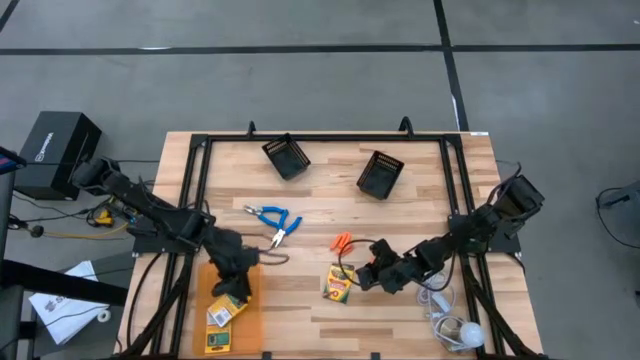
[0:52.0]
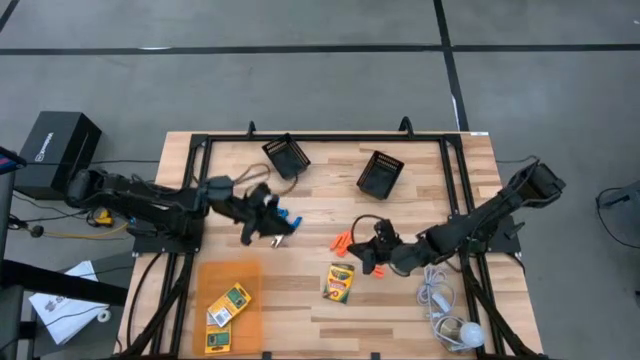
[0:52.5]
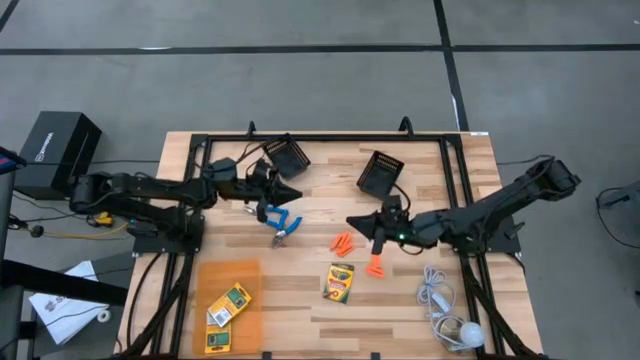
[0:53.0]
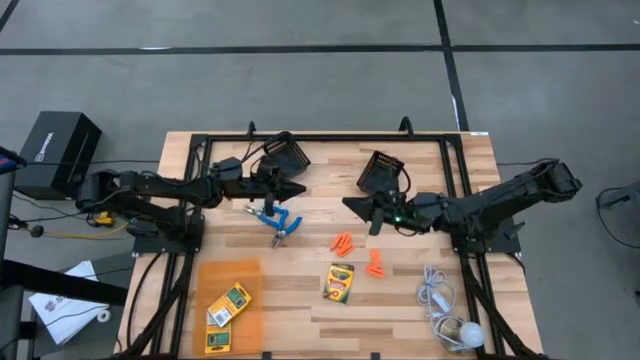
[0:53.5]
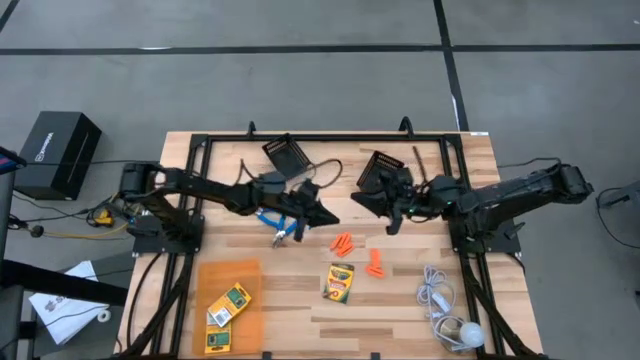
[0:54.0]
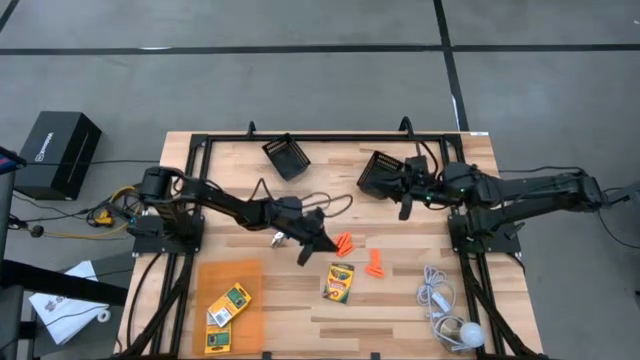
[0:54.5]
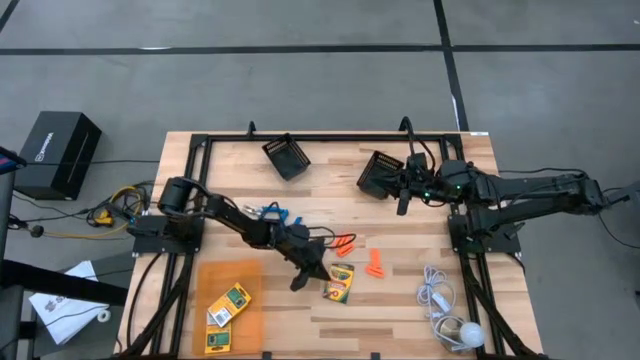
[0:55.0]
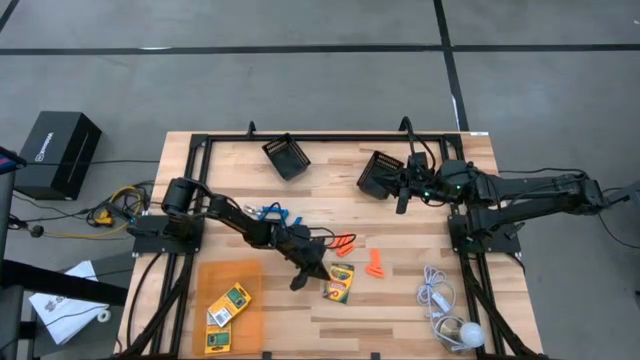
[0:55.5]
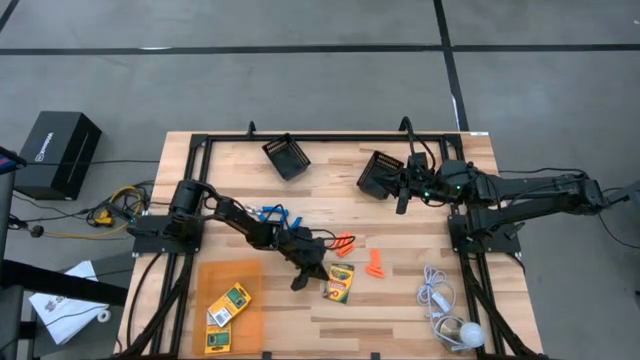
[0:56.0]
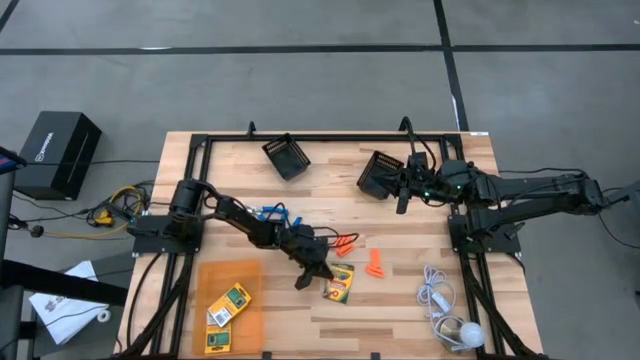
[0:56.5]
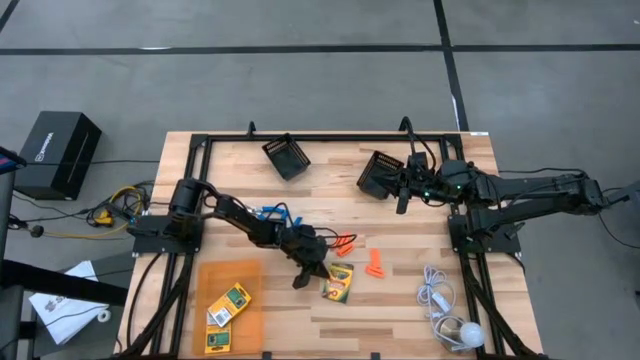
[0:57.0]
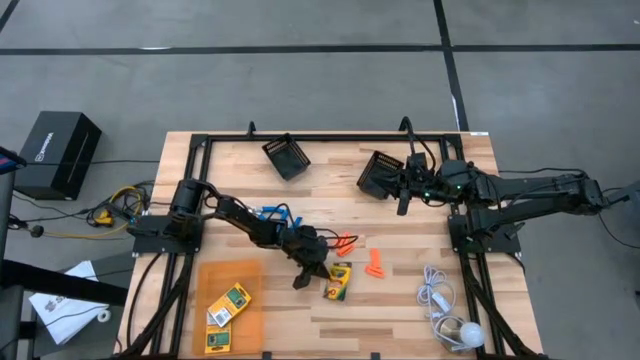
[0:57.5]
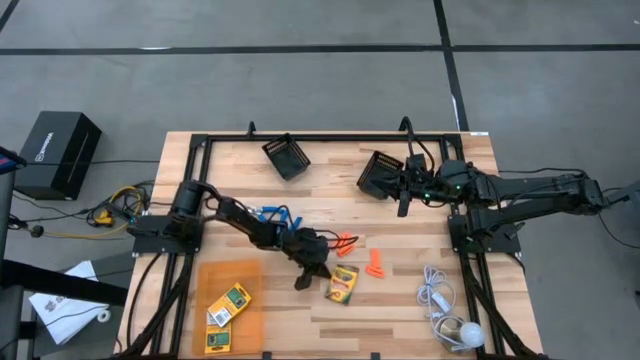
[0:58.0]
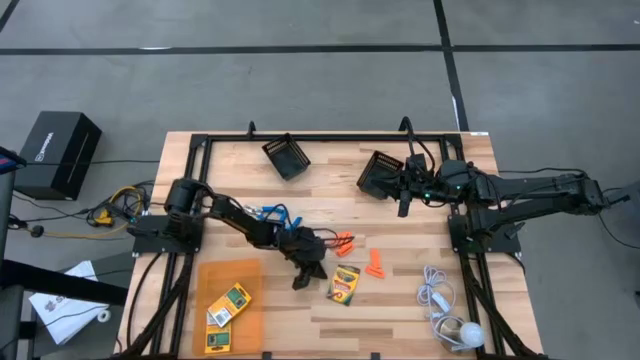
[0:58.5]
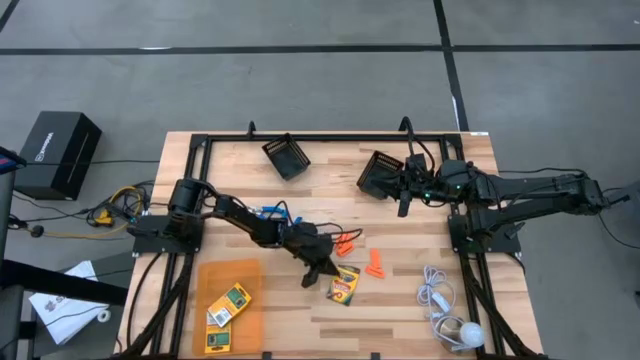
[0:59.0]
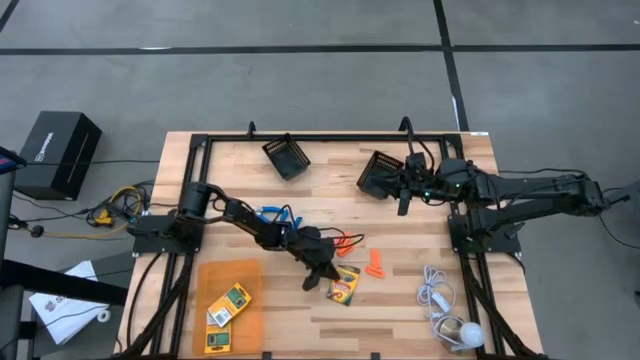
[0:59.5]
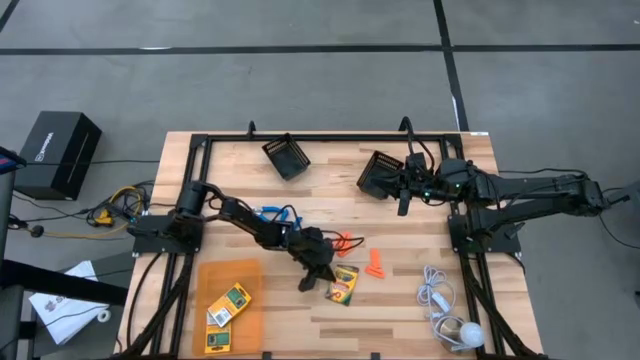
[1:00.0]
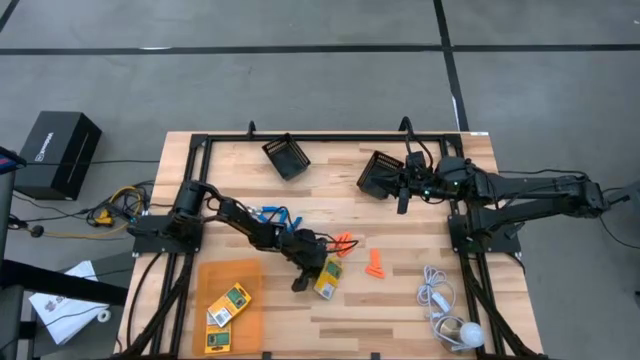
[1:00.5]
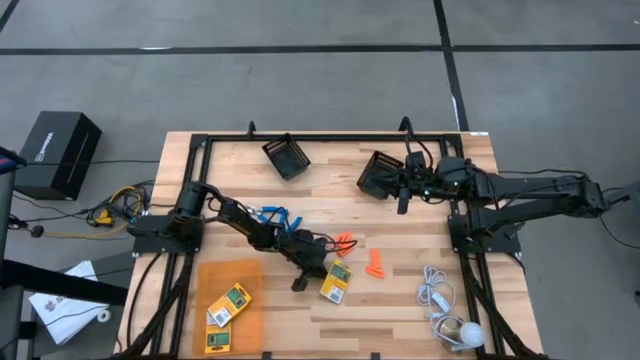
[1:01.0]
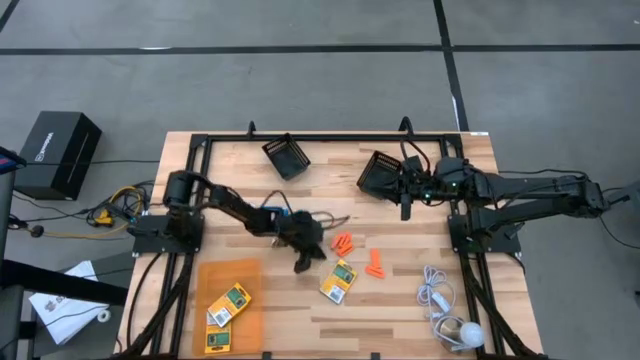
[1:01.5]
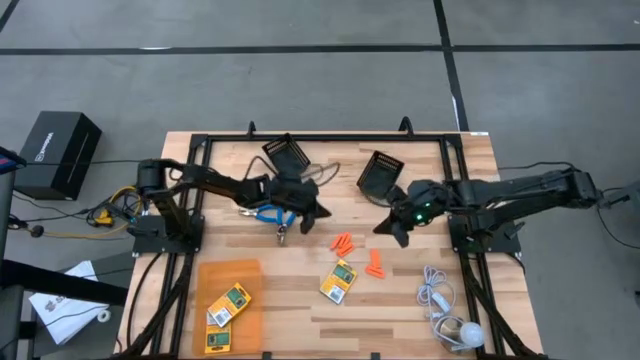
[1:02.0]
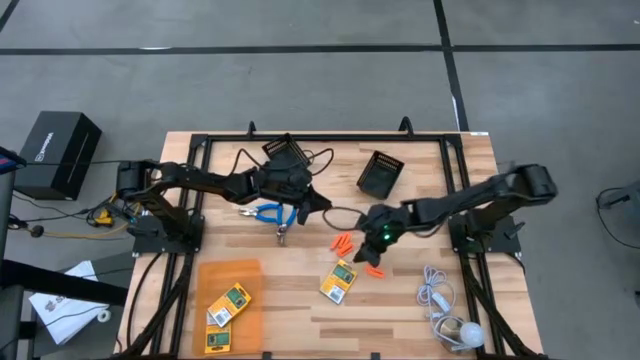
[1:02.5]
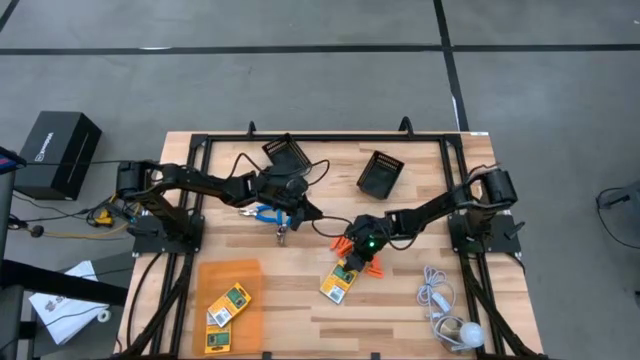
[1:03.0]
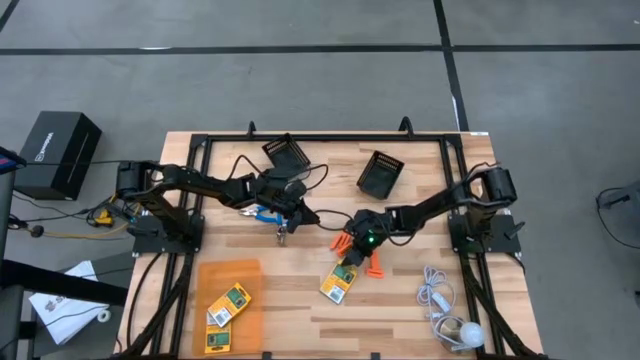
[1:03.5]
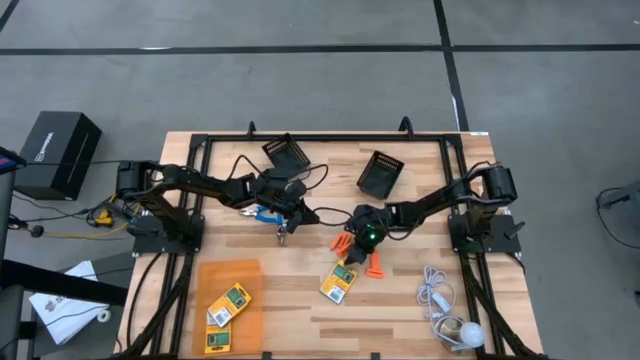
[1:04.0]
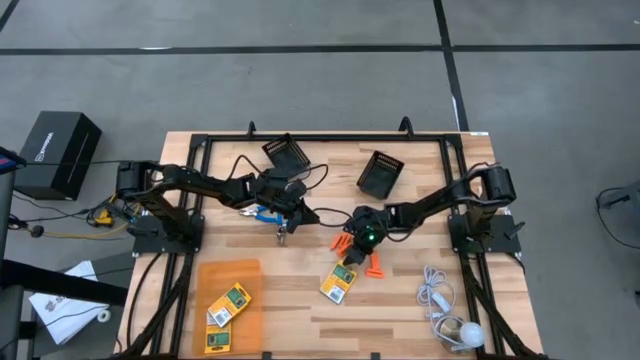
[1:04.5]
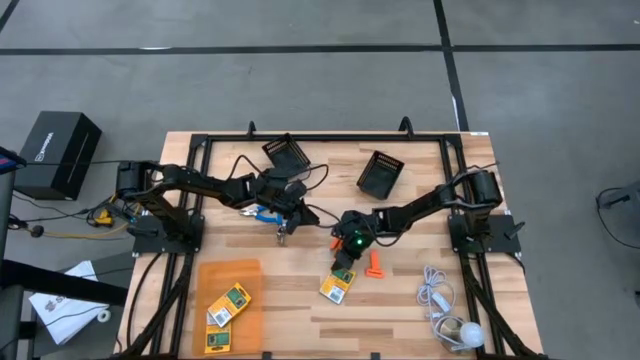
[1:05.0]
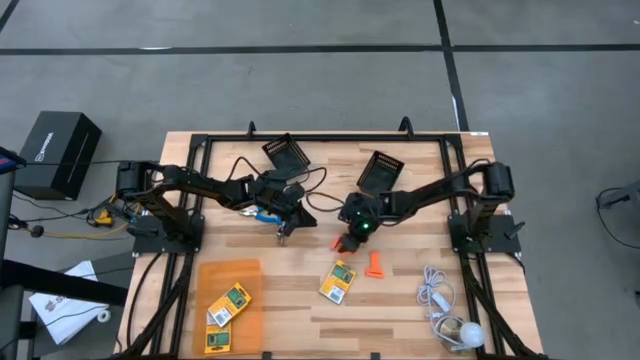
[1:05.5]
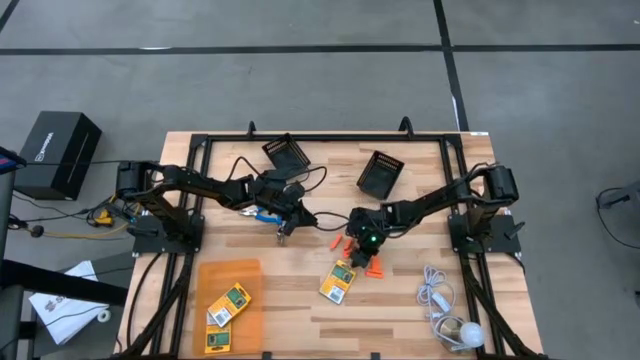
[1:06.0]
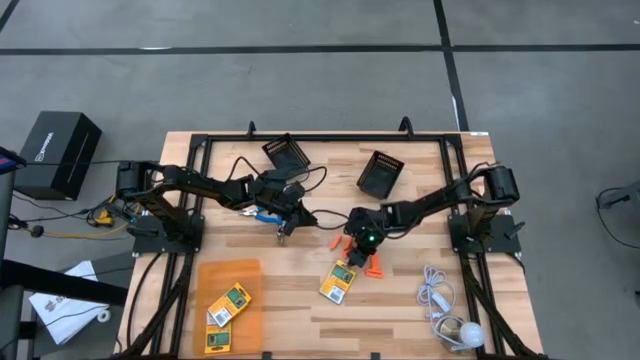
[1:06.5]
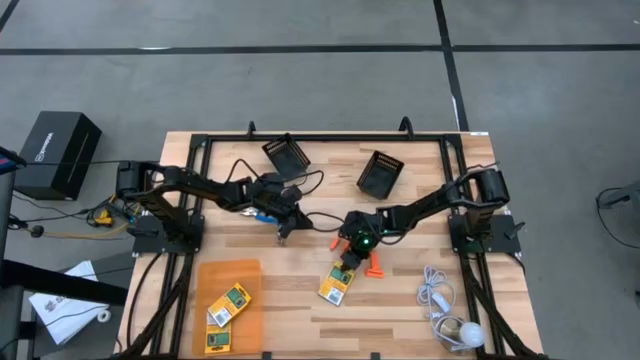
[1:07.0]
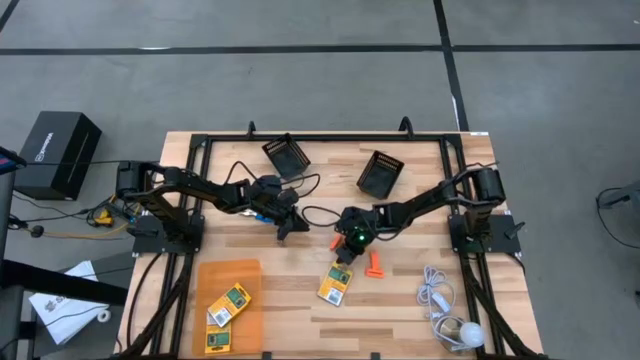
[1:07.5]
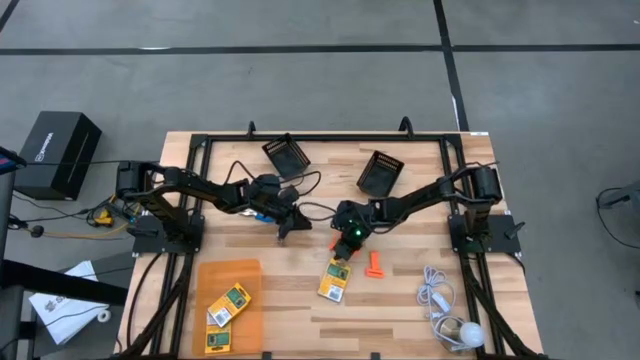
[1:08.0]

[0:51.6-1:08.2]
Task: Pick & Place School Supplies
Put the crayon box into the orange transparent bin

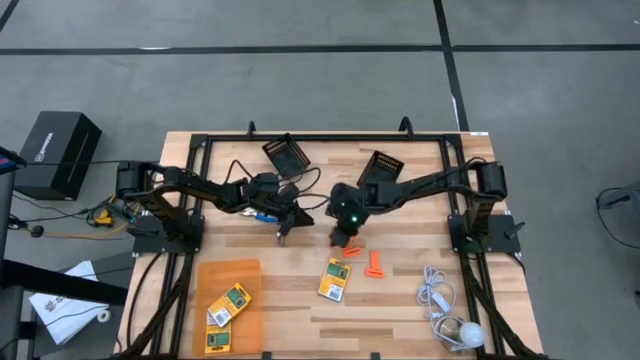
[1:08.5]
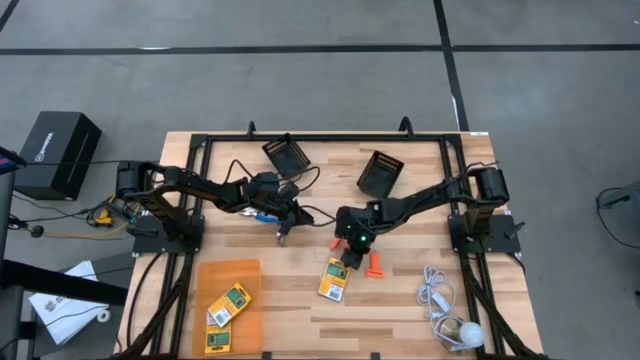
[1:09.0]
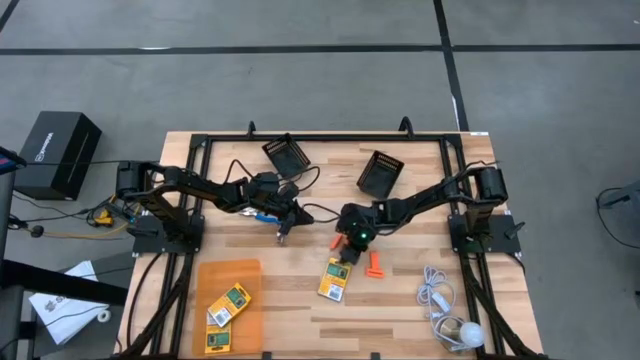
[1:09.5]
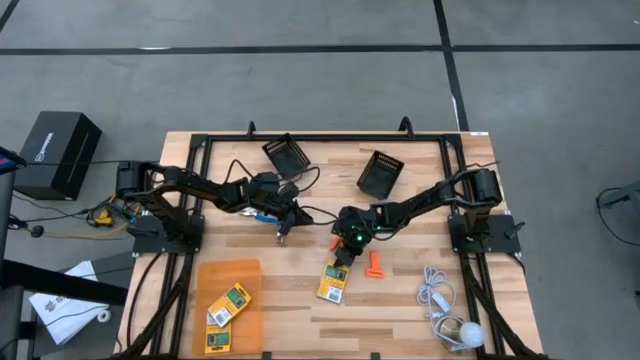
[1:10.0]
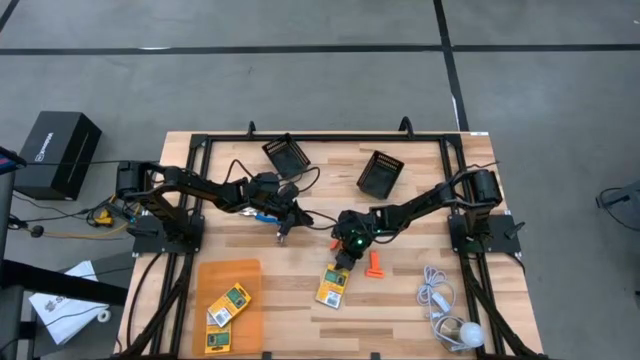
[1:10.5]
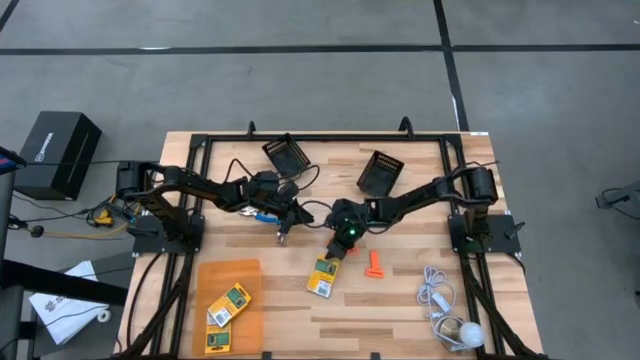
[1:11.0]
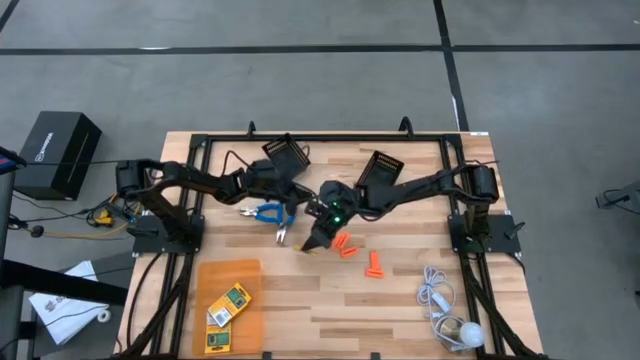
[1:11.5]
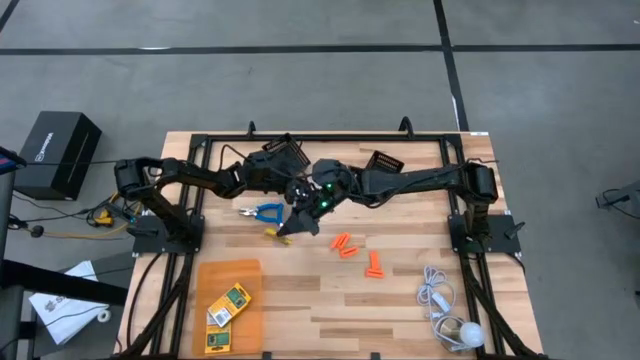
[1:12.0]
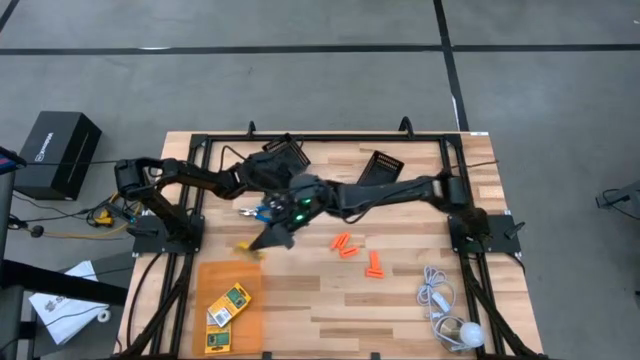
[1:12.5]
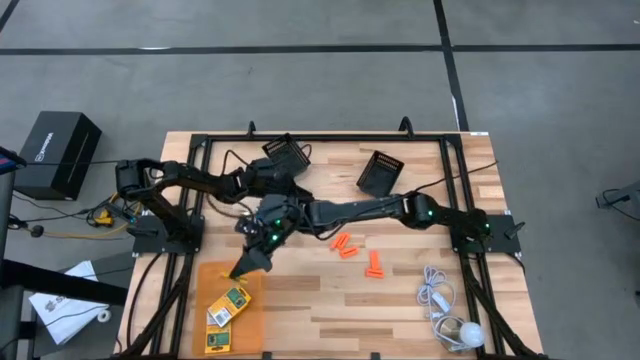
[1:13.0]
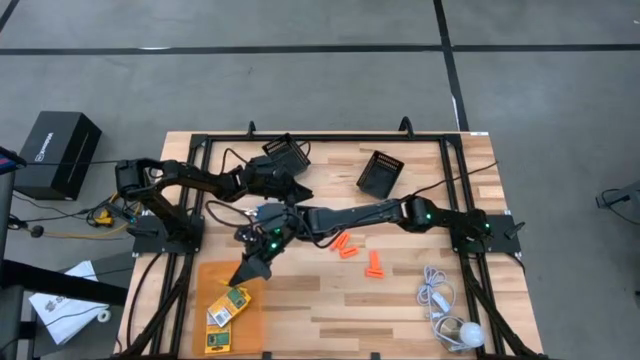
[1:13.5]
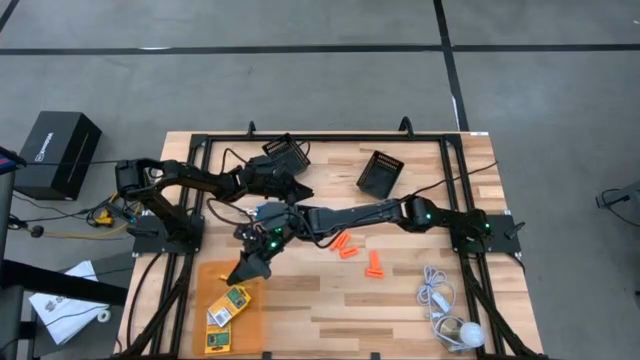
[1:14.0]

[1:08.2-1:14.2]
Put the crayon box into the orange transparent bin
